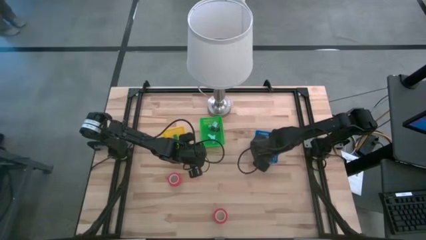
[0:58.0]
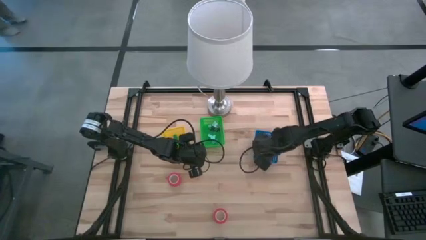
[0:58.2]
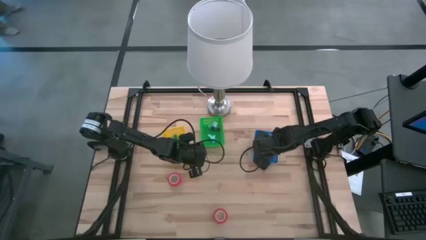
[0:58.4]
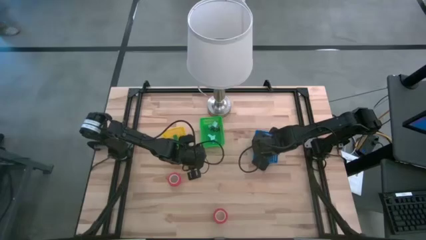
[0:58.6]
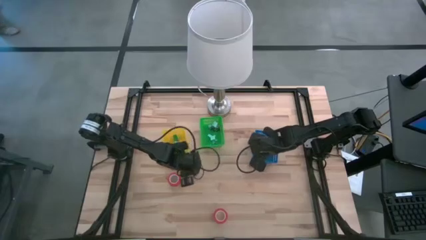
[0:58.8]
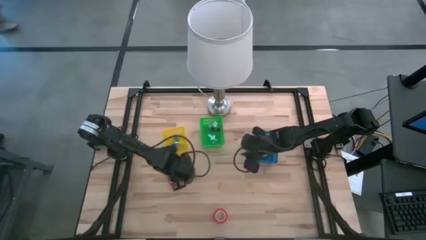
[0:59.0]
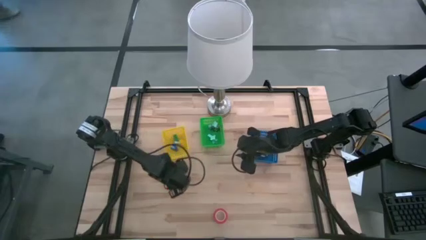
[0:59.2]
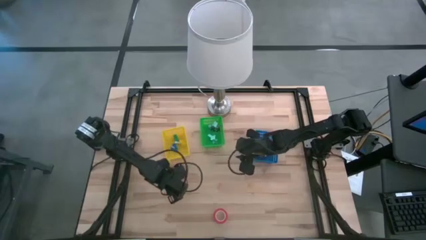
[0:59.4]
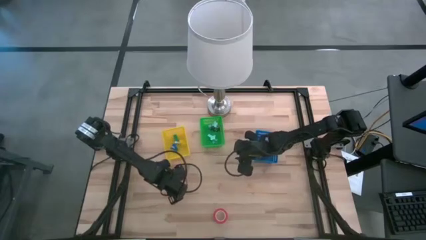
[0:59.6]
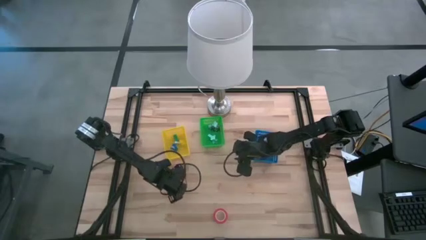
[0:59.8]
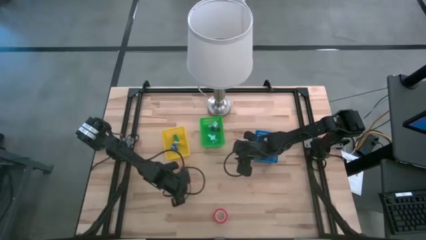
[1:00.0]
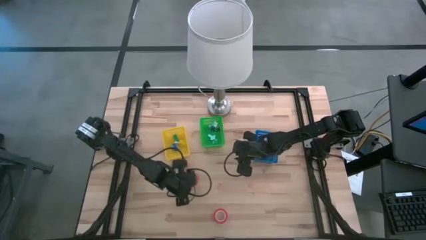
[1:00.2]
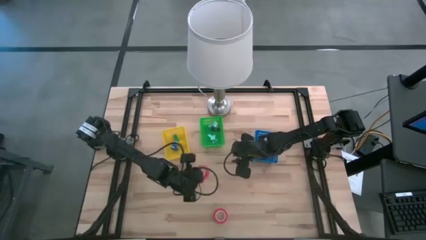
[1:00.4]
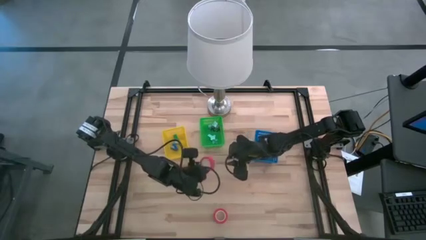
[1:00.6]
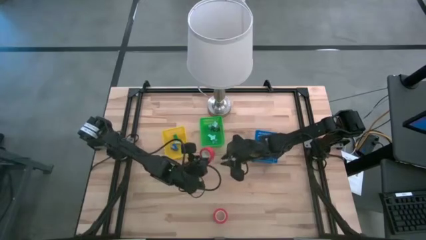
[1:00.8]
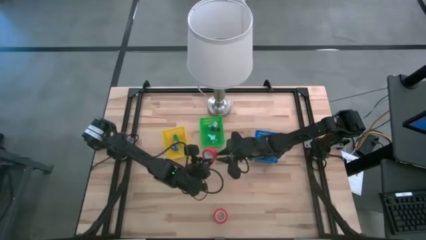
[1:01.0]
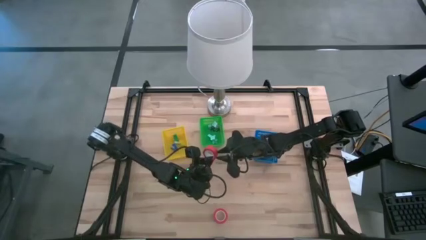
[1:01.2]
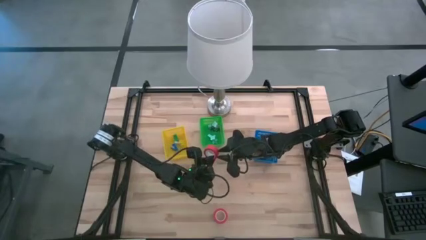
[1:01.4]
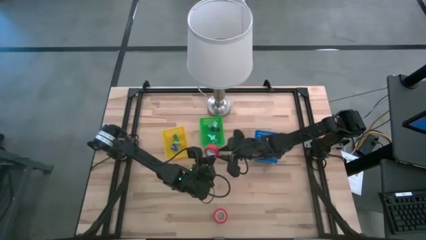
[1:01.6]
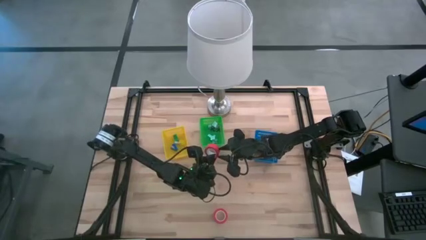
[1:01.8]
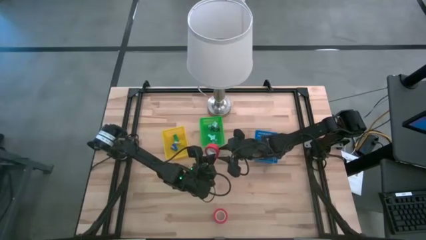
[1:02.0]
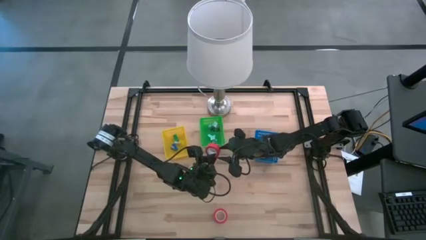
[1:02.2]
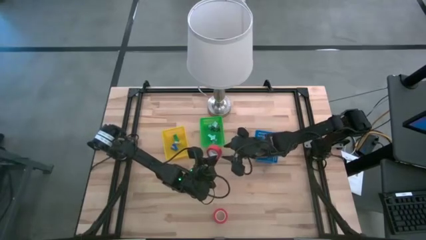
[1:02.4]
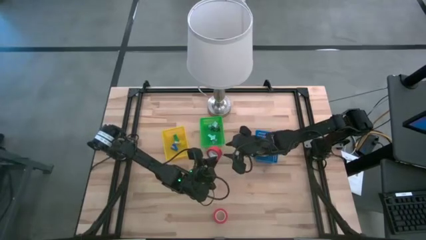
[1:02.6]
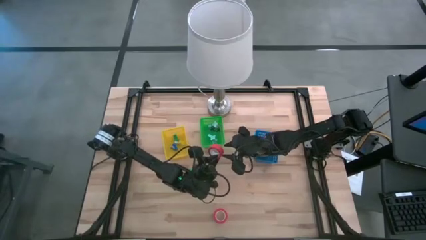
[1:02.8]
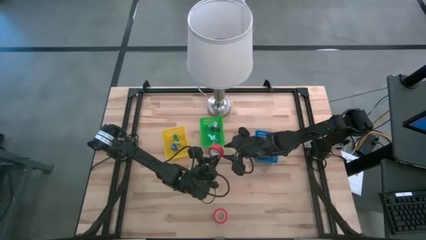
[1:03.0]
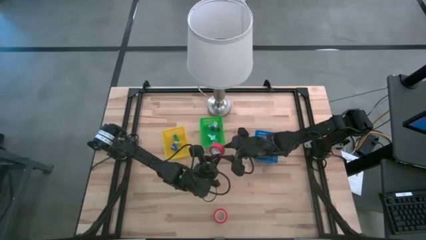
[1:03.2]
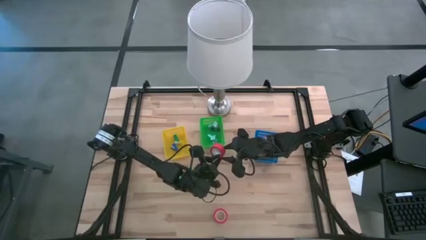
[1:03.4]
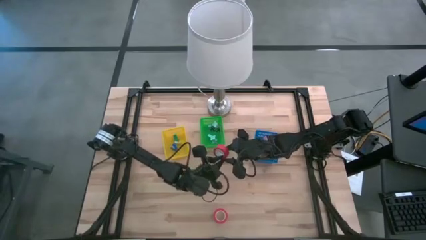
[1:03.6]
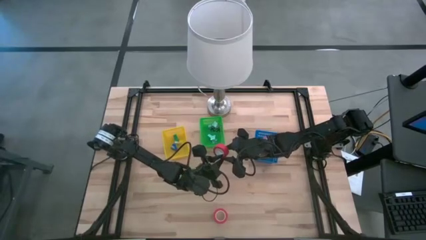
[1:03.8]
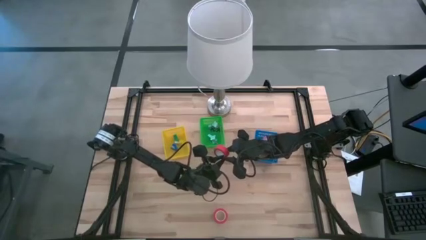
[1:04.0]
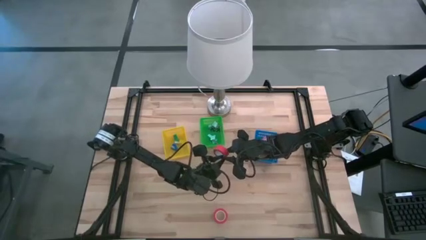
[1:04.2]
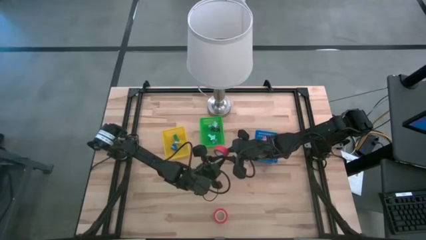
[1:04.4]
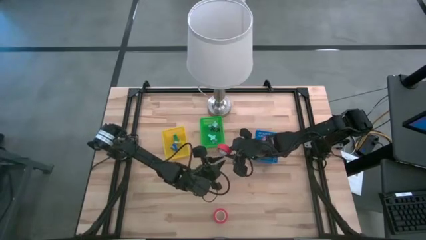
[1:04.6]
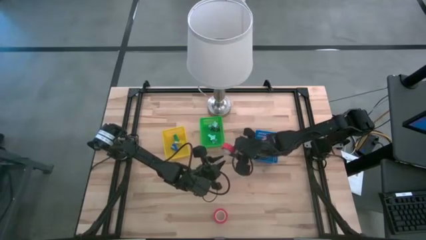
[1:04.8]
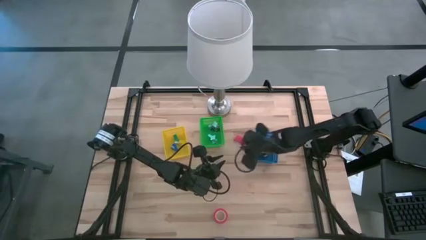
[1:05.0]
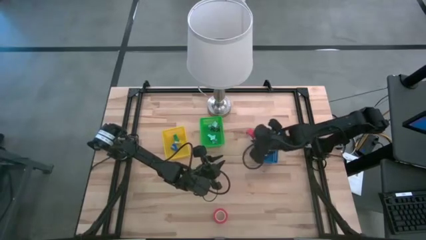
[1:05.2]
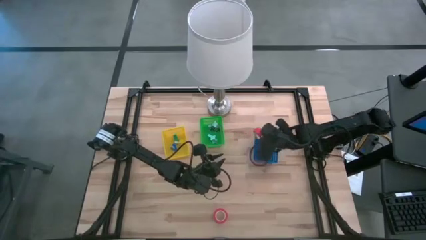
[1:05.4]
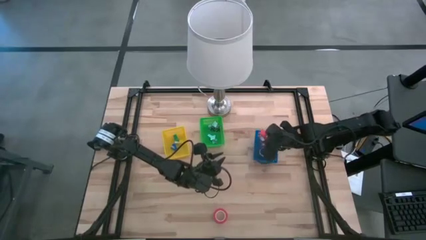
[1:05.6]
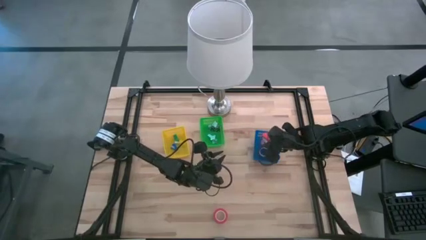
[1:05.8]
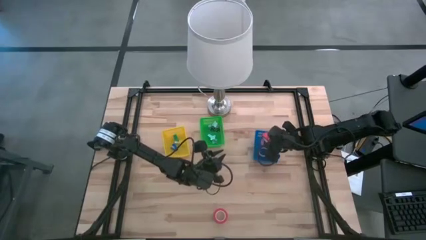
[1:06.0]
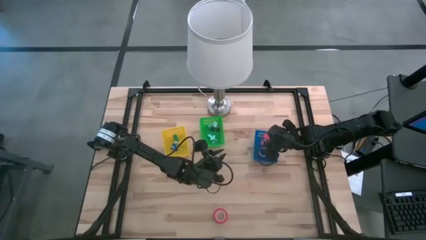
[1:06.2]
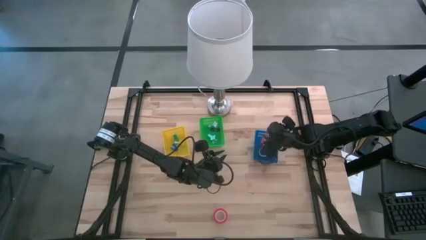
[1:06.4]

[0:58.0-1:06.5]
Task: Pick and place Stapler, Stapler remover, tape
Put the top orange tape into the blue bin

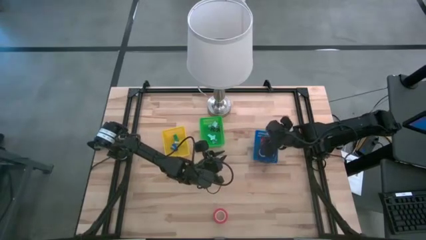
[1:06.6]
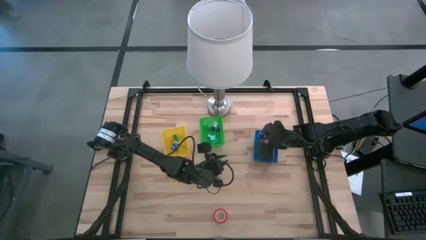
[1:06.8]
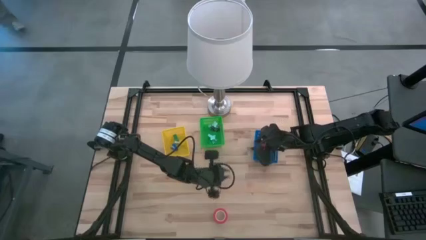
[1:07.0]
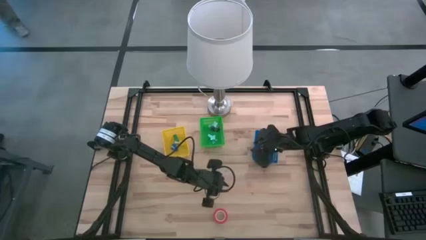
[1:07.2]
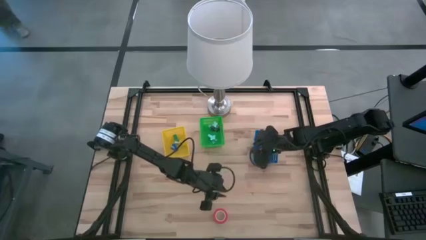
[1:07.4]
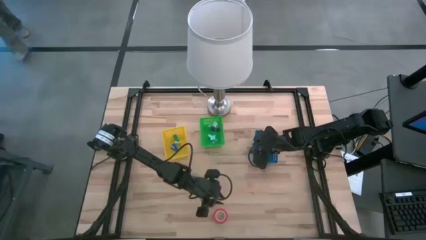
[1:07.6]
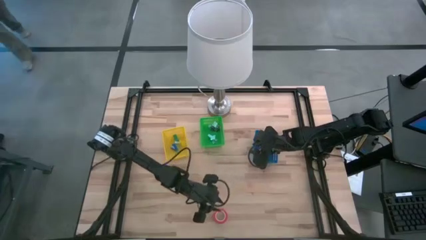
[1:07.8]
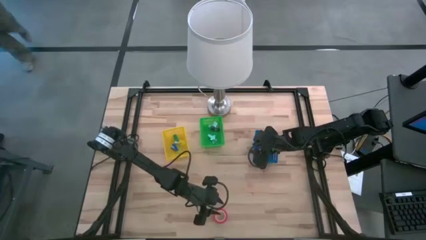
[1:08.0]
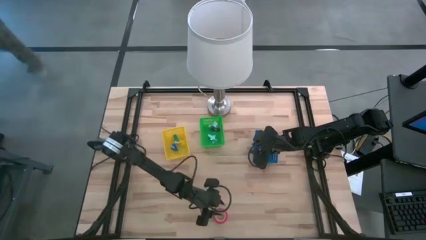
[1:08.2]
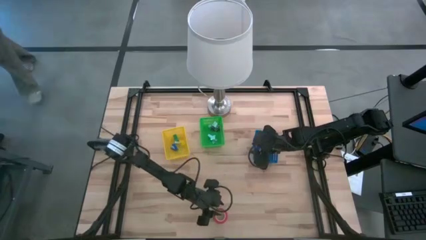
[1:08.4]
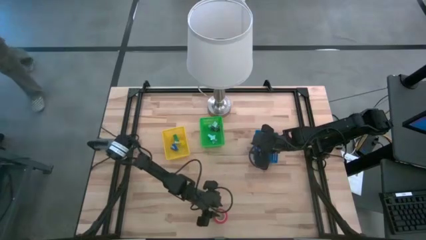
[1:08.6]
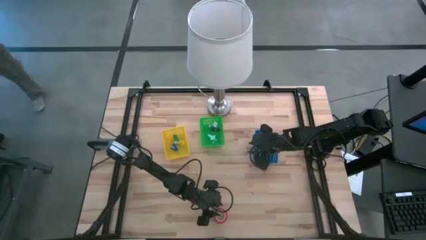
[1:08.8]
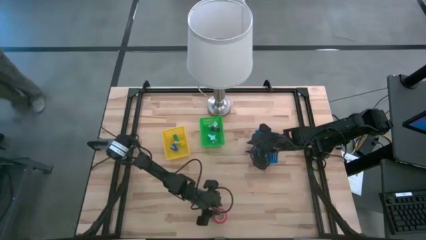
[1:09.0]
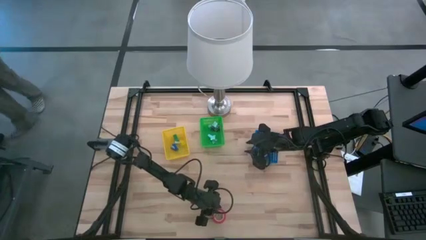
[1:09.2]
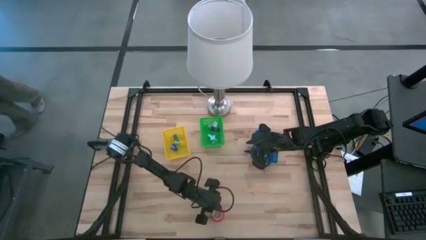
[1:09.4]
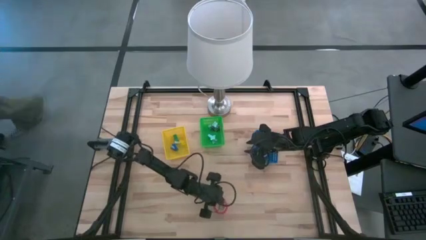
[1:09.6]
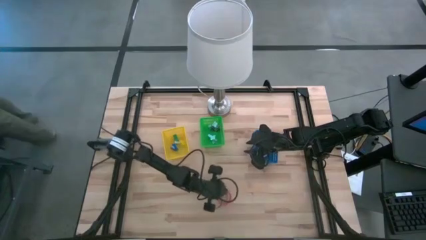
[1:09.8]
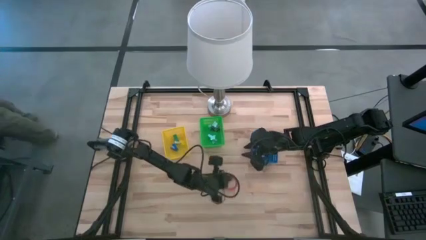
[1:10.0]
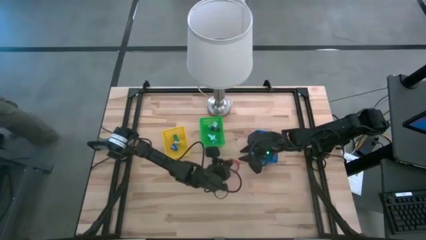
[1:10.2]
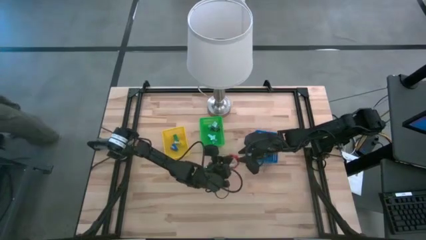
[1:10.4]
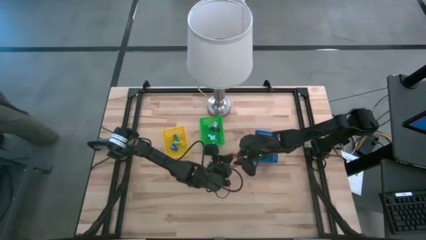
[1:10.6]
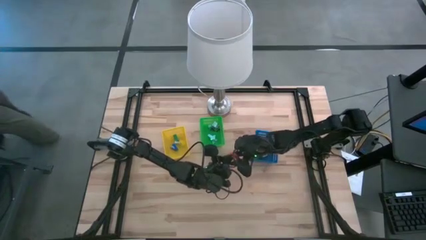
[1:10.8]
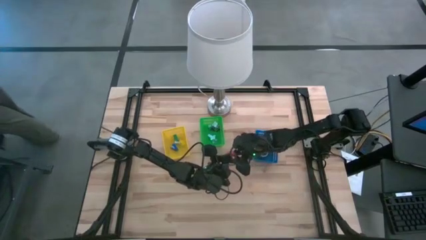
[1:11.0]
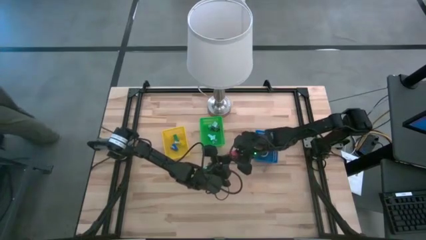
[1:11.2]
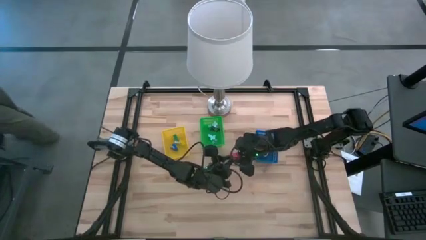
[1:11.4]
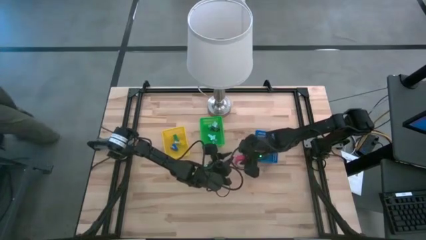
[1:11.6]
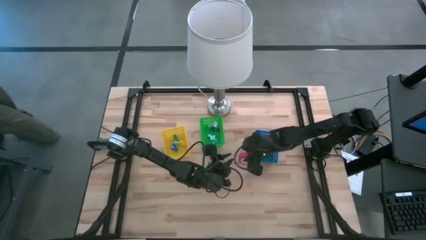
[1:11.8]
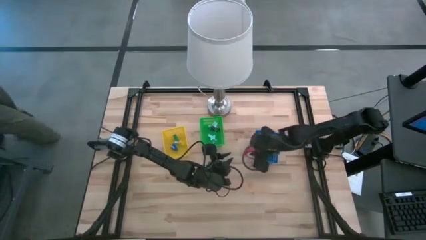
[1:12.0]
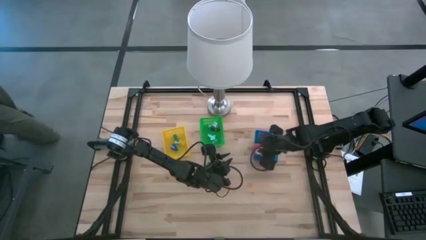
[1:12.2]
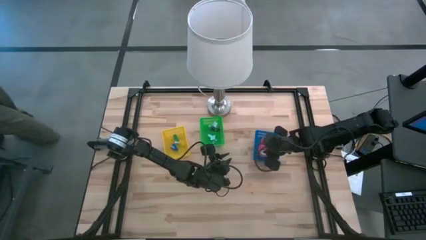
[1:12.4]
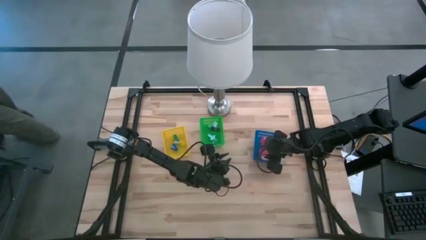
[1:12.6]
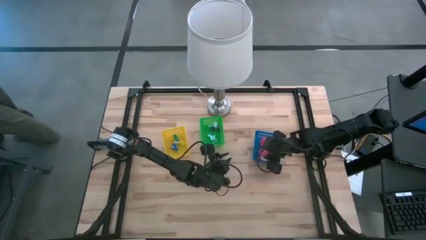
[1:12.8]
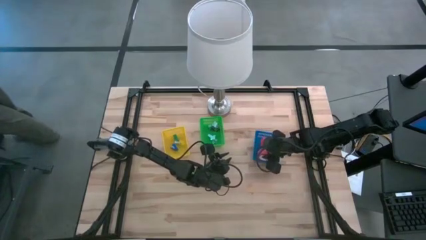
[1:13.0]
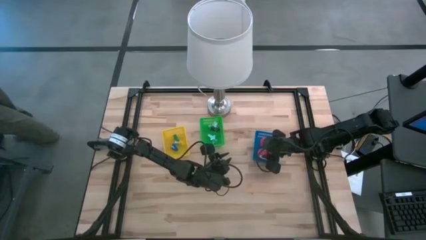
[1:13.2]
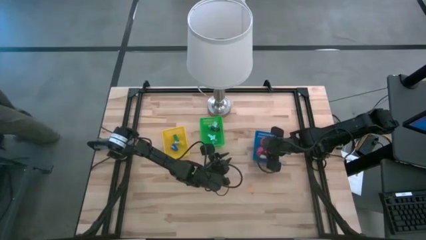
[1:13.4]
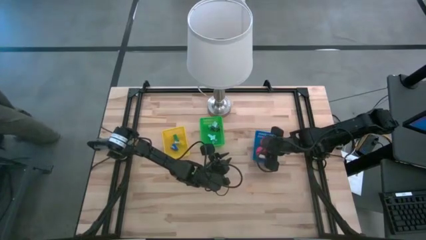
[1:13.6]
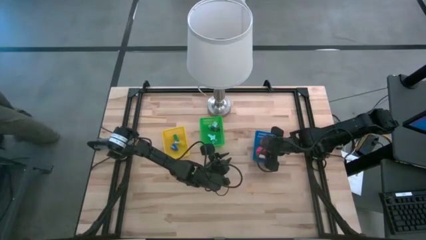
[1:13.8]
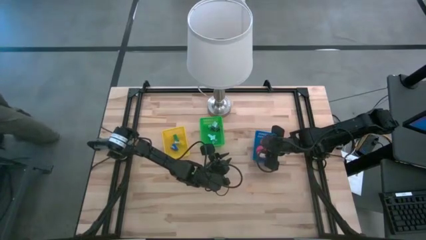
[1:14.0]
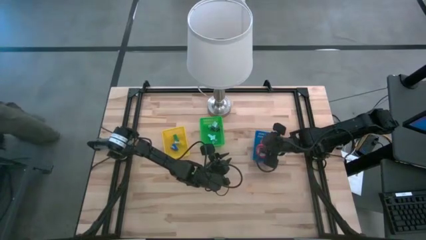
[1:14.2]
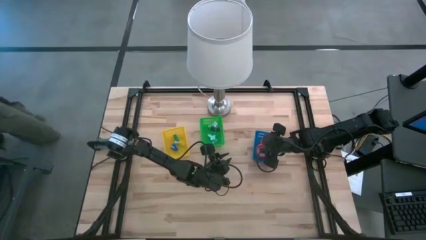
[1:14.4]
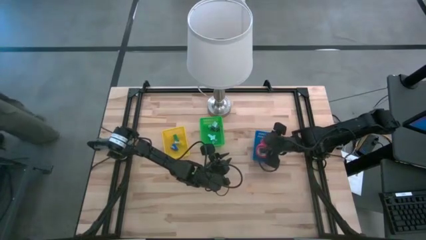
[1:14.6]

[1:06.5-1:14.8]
Put the orange tape into the blue bin
